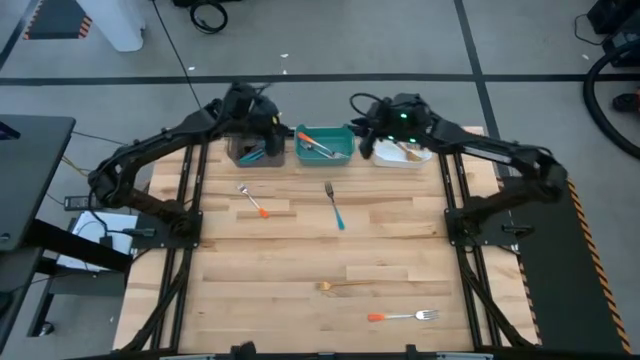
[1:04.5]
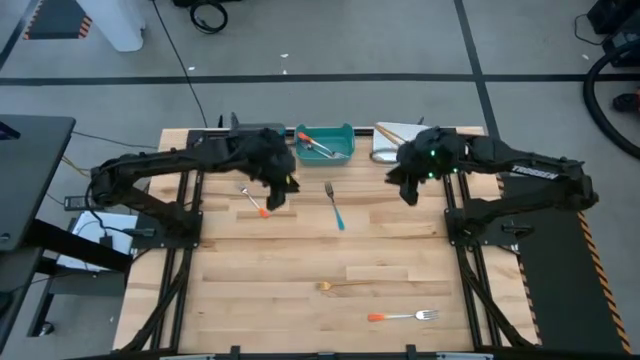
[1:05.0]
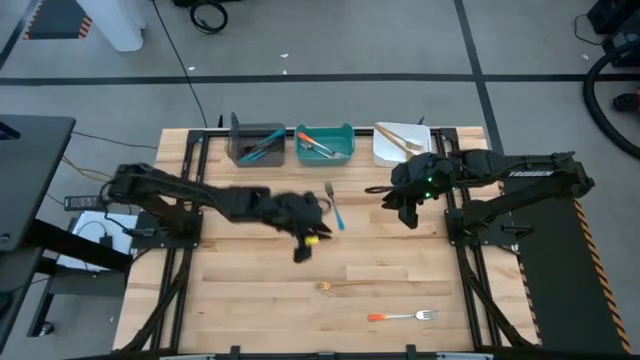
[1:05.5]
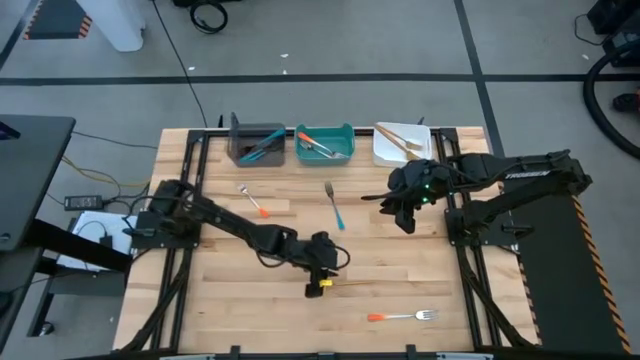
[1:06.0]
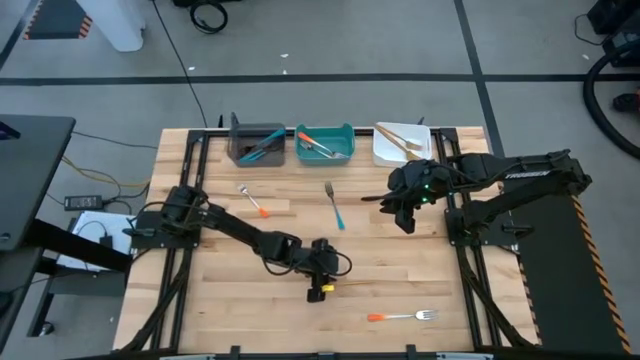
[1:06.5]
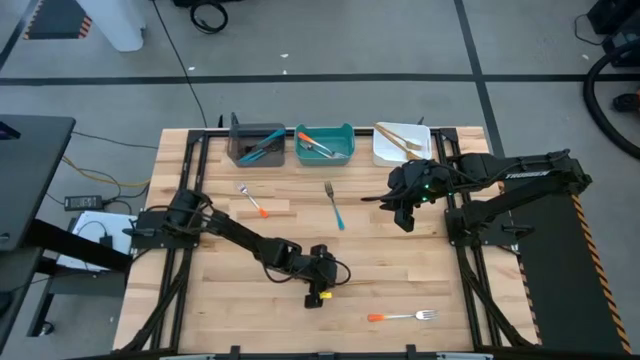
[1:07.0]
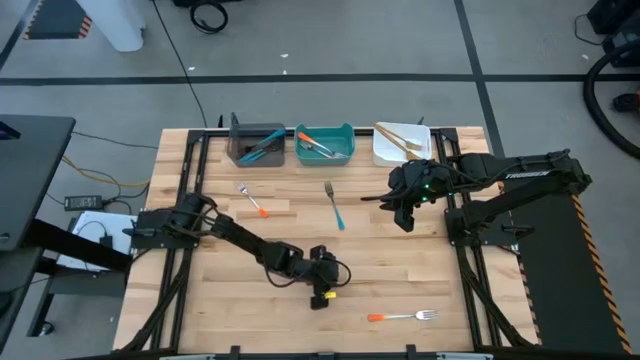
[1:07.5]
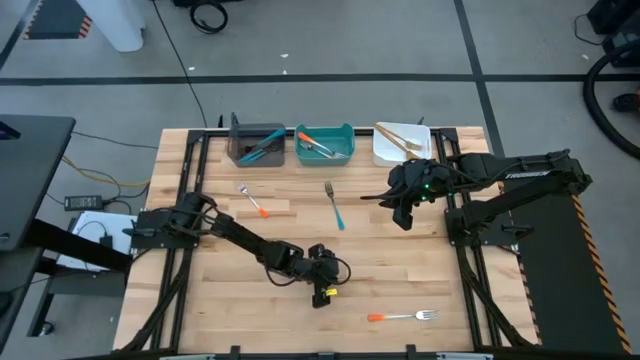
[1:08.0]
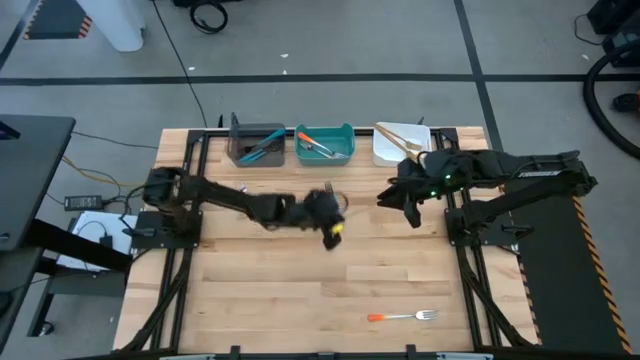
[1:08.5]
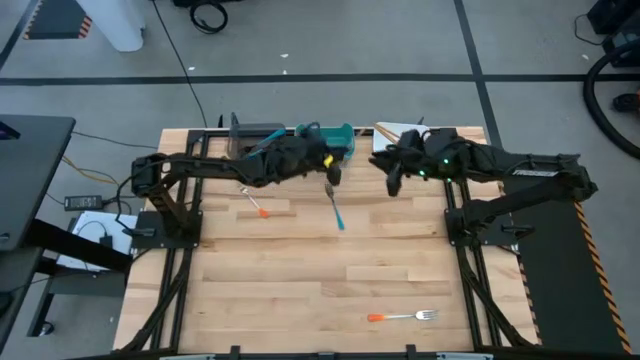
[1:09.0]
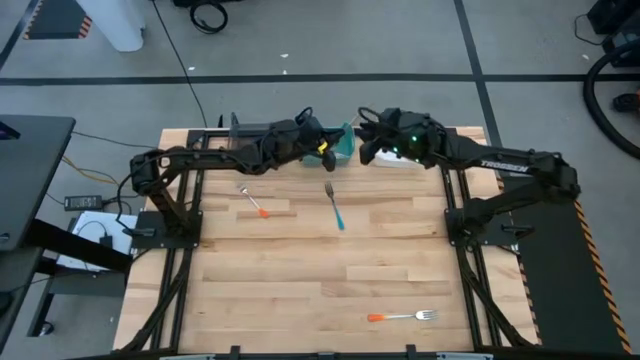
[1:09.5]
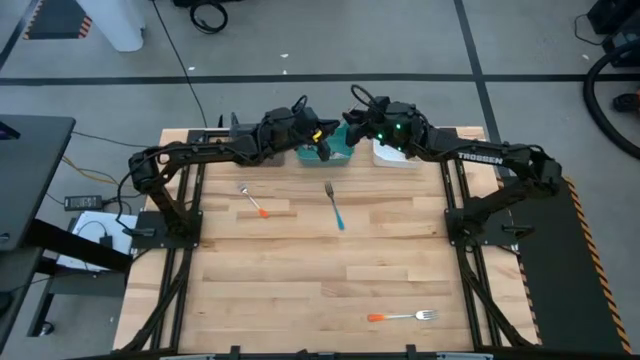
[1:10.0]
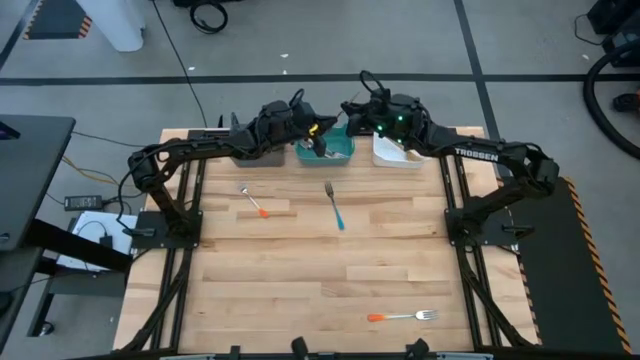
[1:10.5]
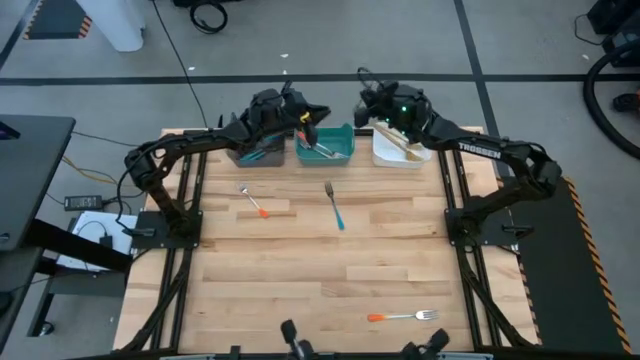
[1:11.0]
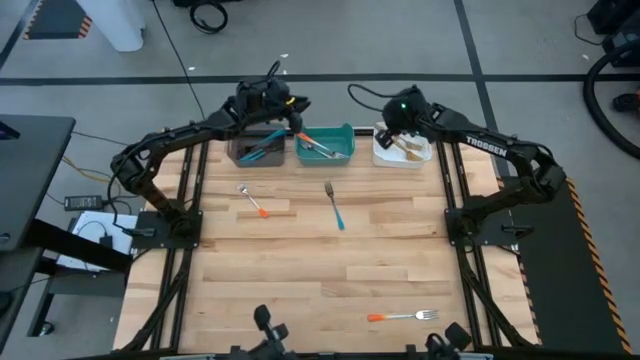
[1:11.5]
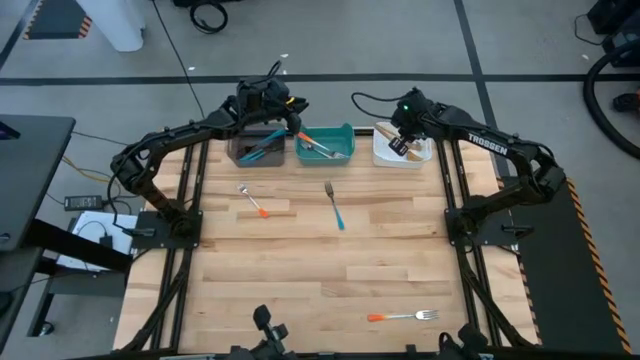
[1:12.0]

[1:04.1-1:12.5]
Task: Sort silverware by color (type)
Put the gold fork into the white bin

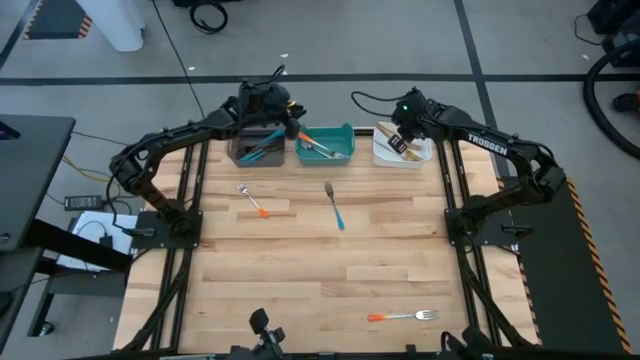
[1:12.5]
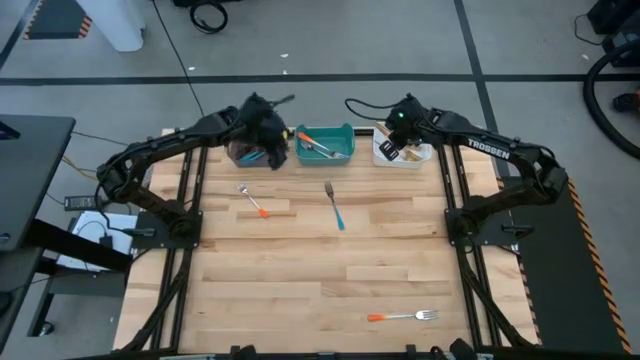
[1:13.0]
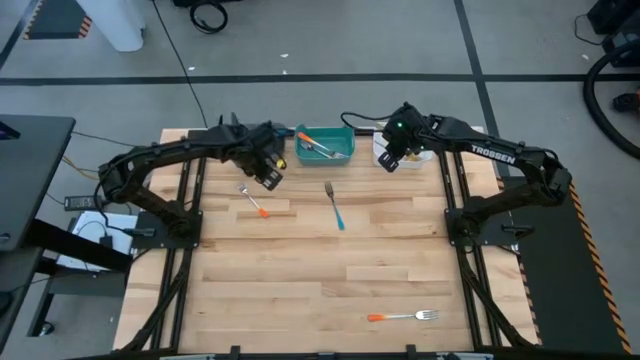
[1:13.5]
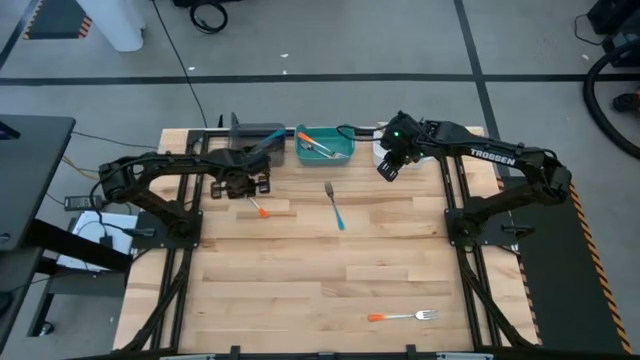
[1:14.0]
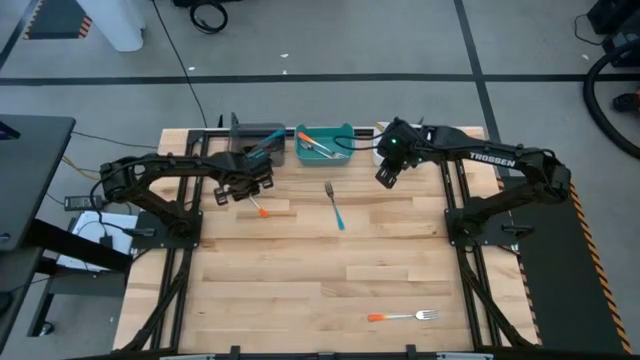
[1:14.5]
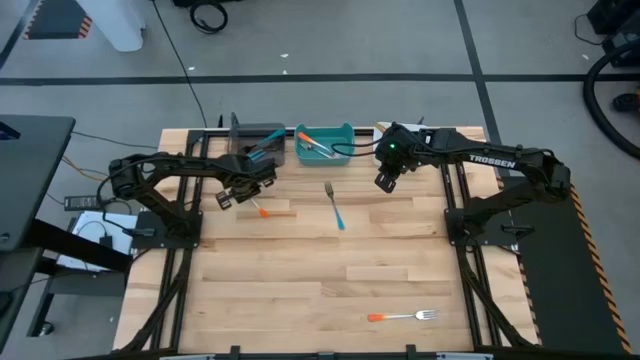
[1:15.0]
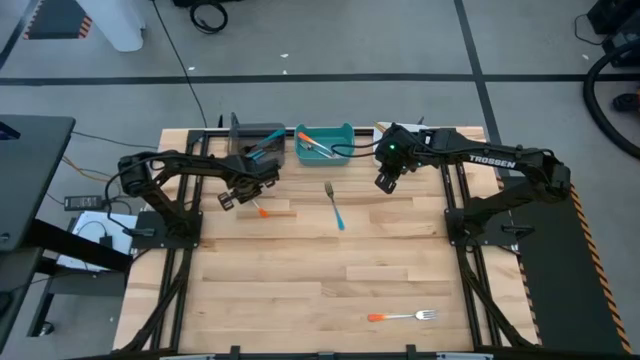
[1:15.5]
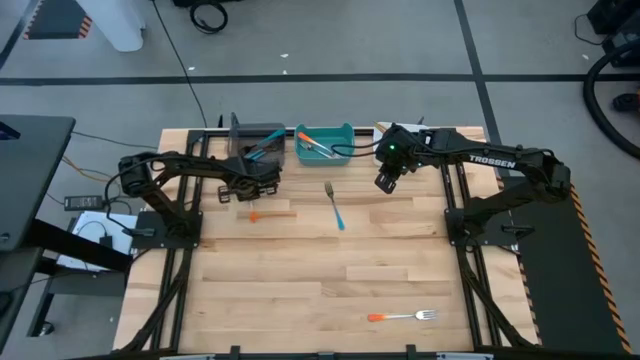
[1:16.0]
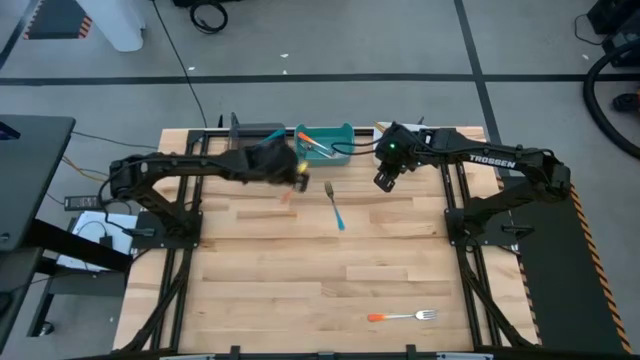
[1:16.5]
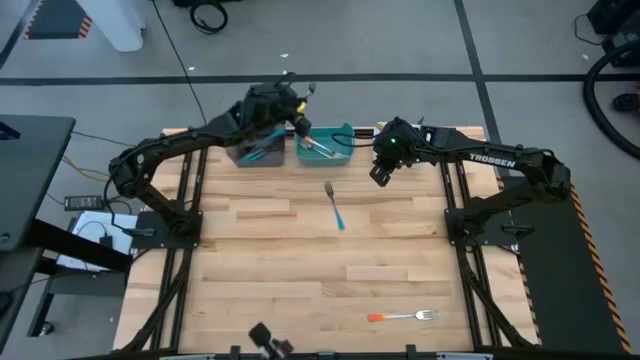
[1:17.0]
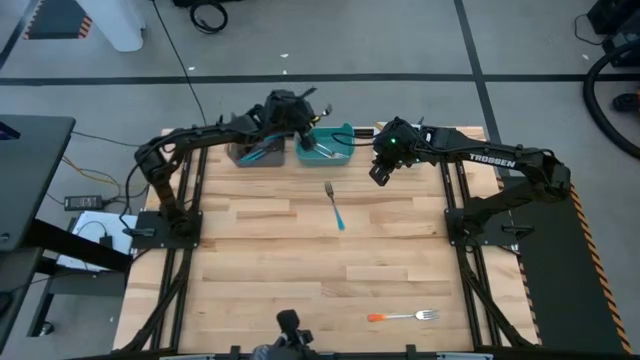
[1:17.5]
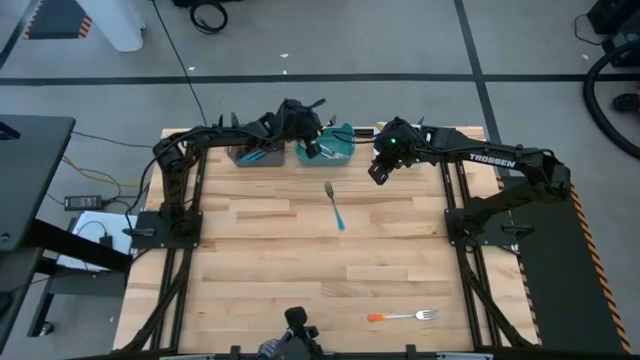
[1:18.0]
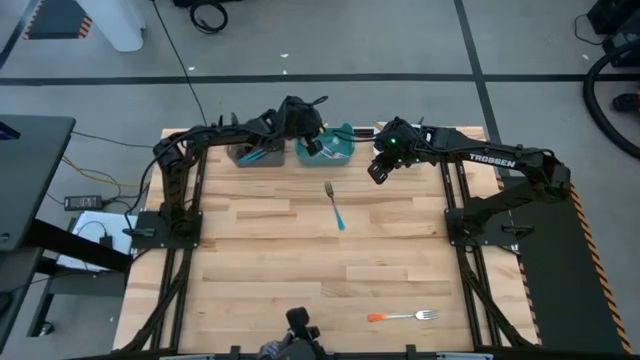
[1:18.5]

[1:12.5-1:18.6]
Put the top orange fork into the blue bin

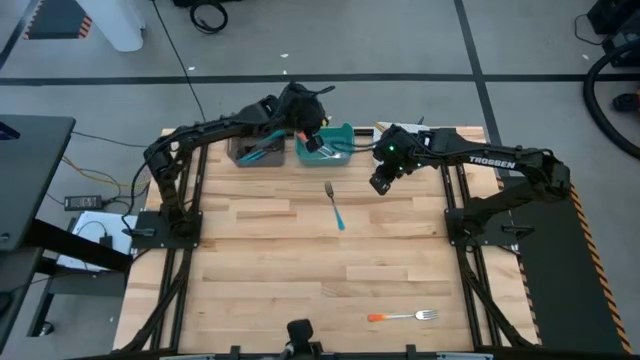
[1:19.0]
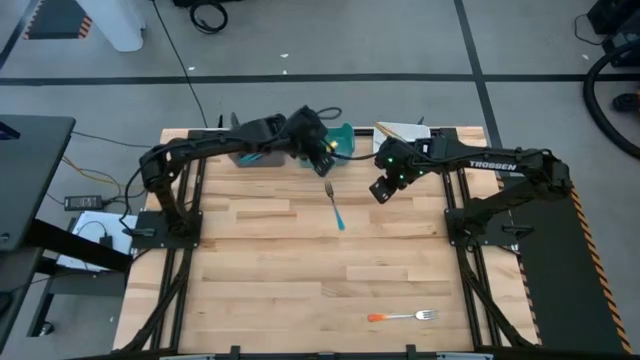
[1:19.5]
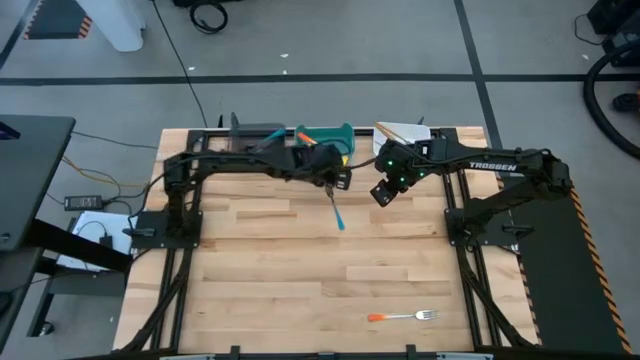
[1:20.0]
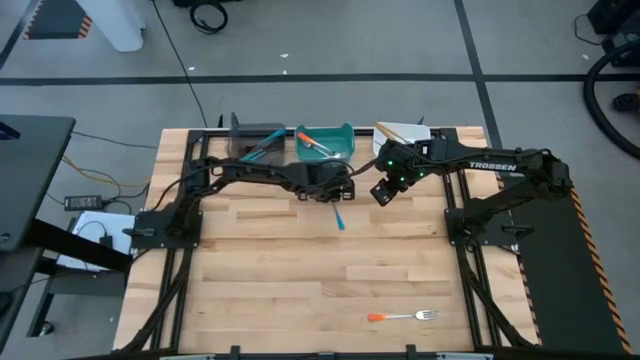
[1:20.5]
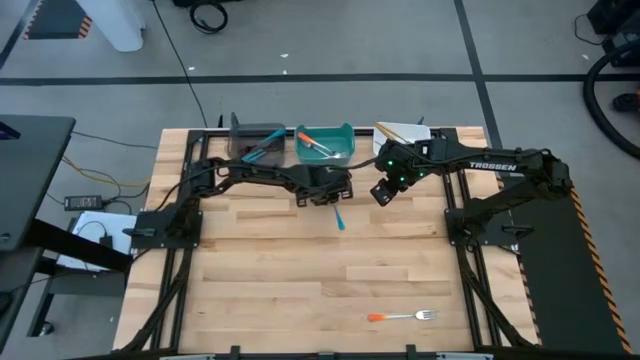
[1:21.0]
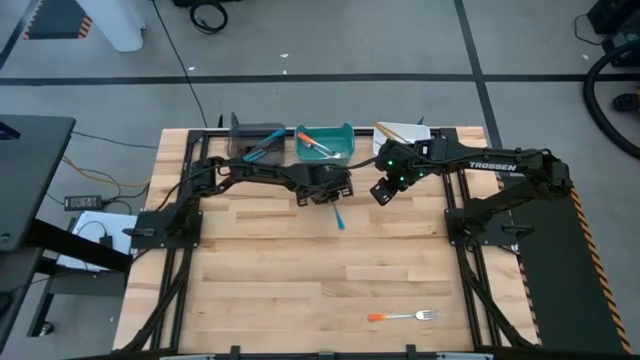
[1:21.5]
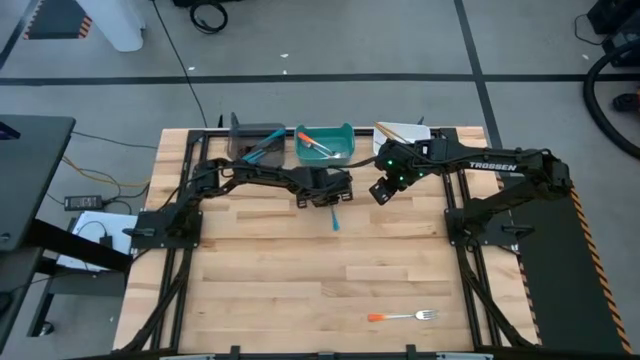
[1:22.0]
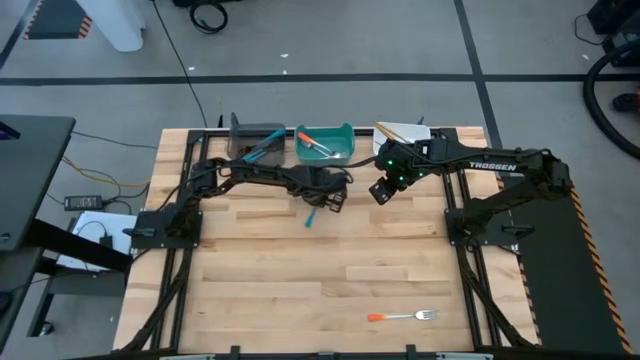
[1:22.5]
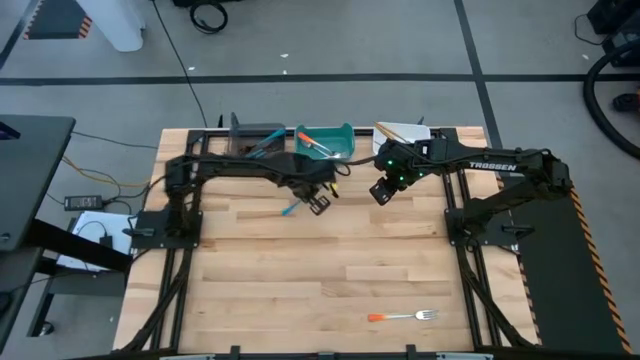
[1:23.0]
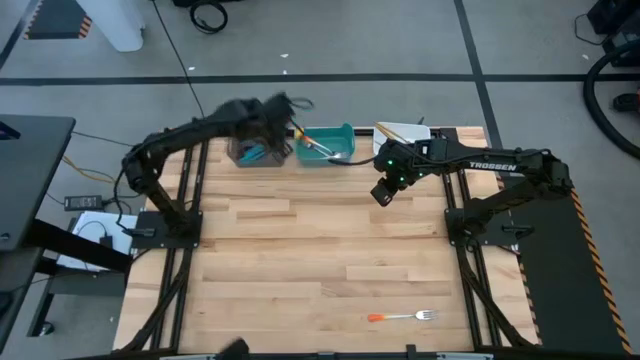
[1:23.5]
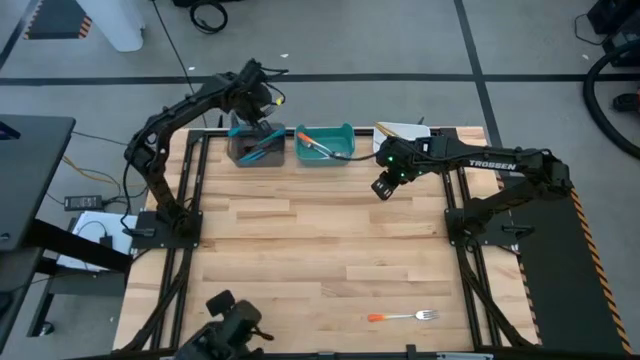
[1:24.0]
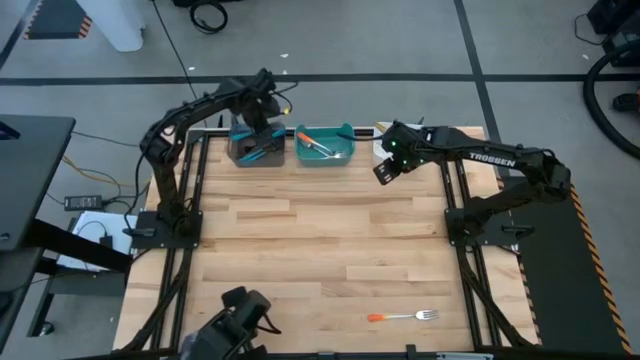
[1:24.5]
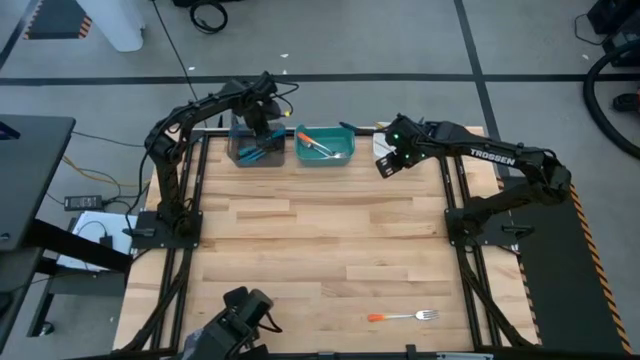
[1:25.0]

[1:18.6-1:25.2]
Put the blue fork into the black bin
